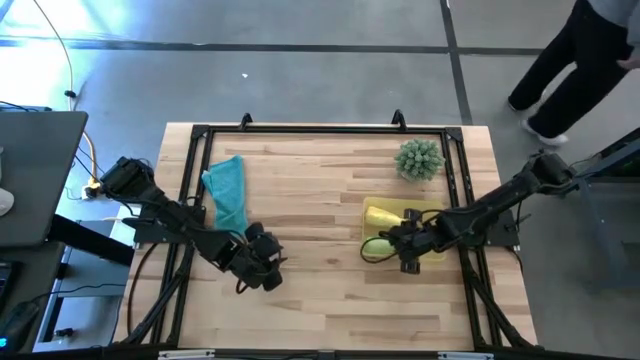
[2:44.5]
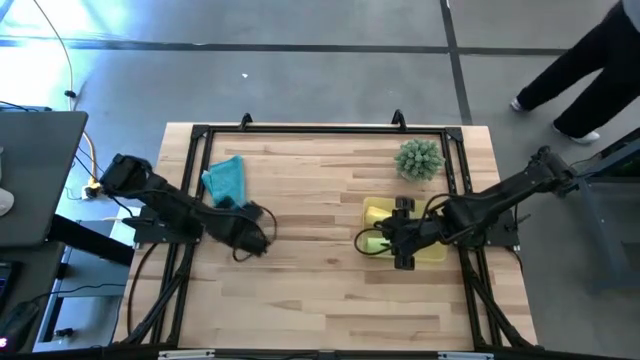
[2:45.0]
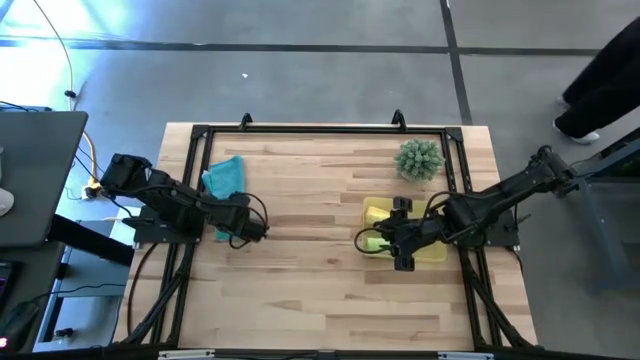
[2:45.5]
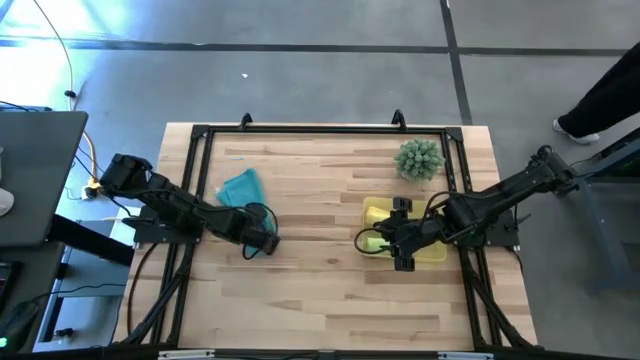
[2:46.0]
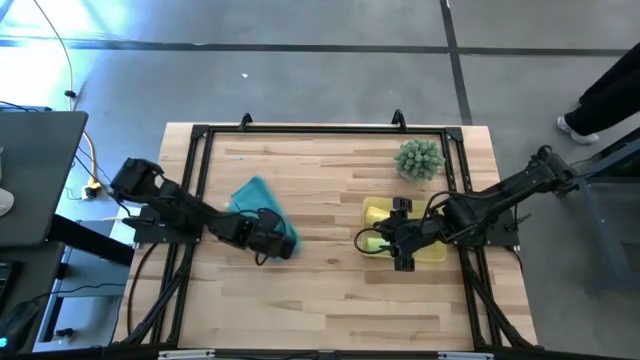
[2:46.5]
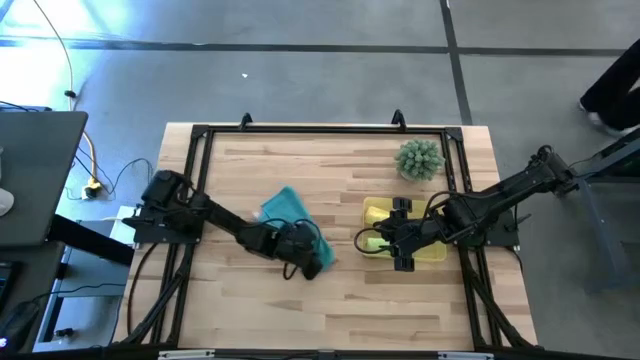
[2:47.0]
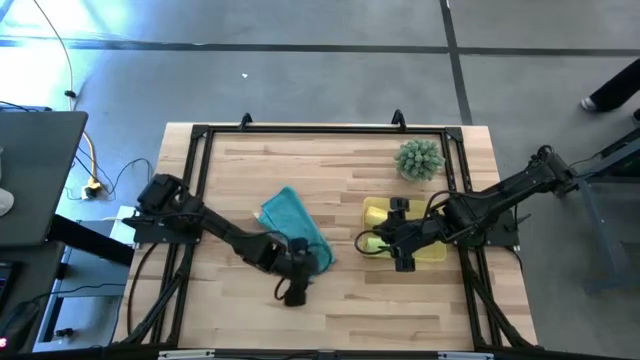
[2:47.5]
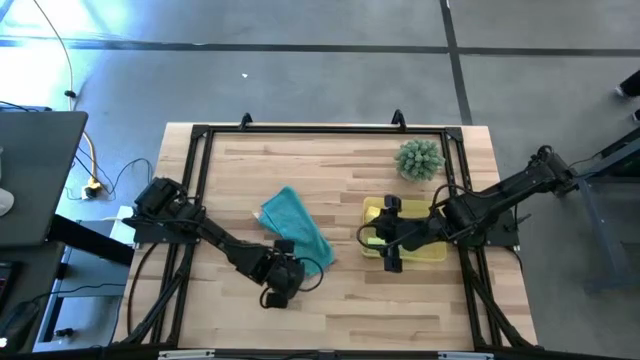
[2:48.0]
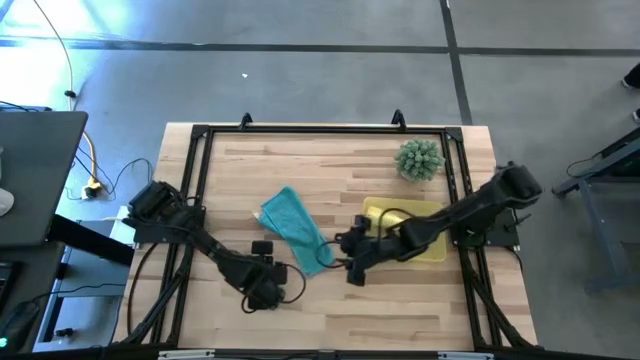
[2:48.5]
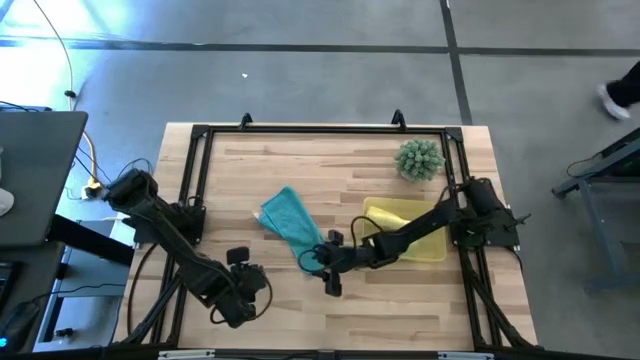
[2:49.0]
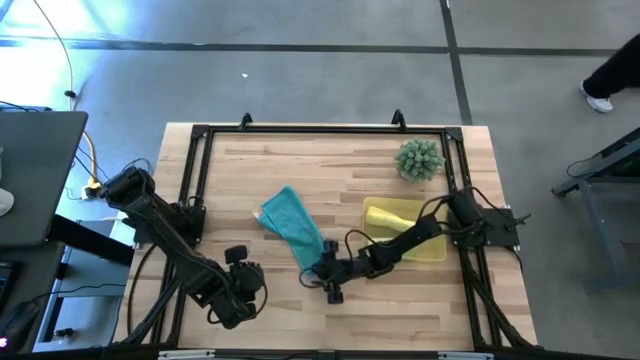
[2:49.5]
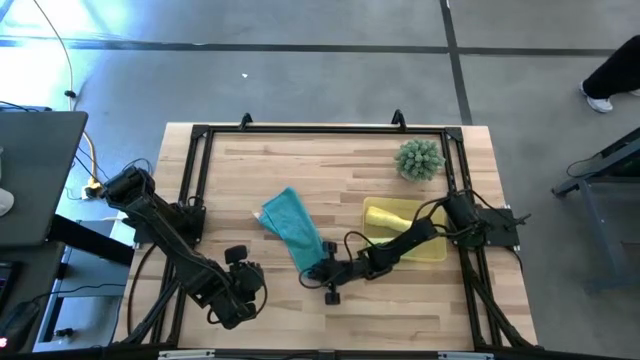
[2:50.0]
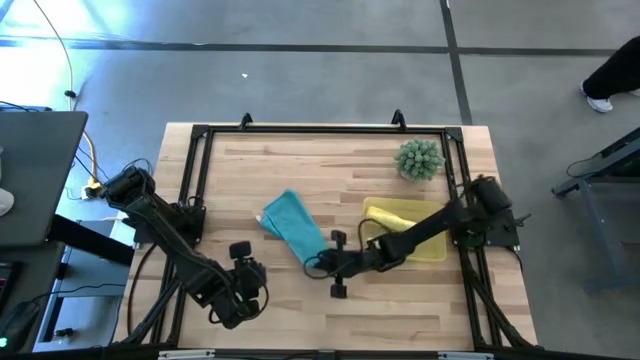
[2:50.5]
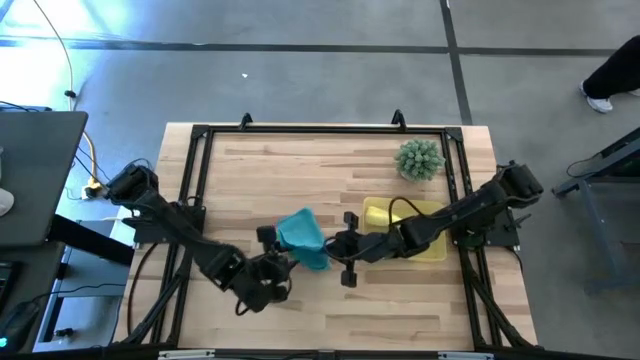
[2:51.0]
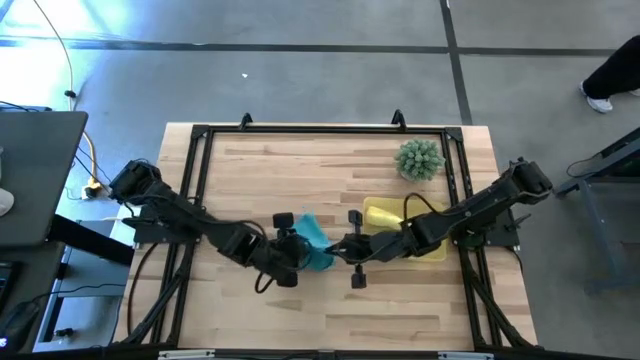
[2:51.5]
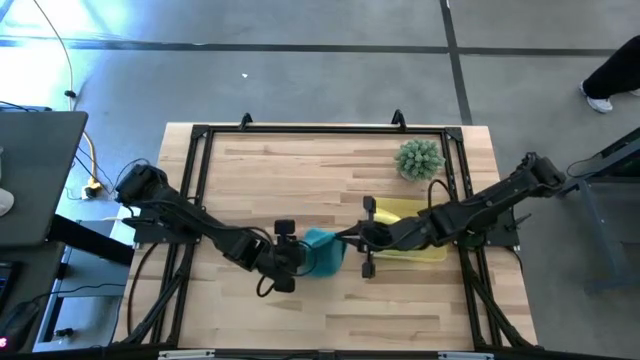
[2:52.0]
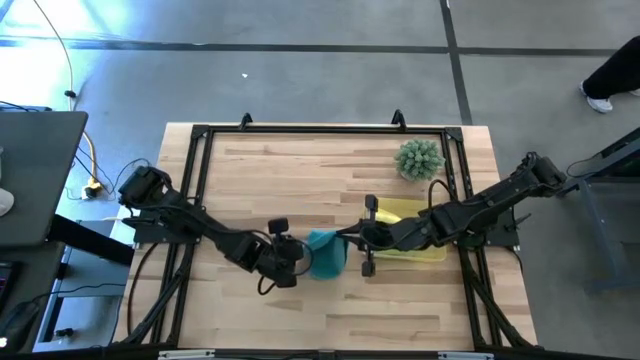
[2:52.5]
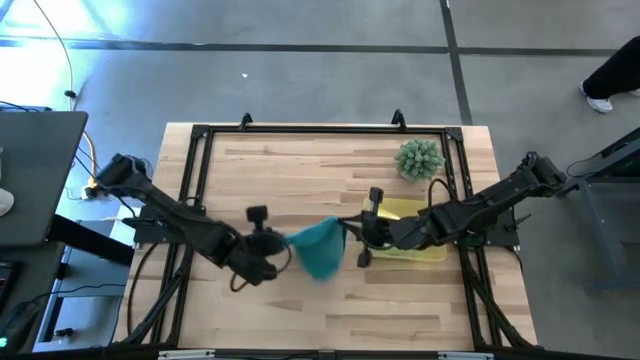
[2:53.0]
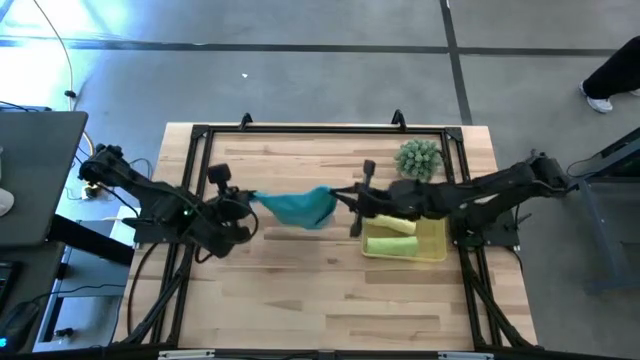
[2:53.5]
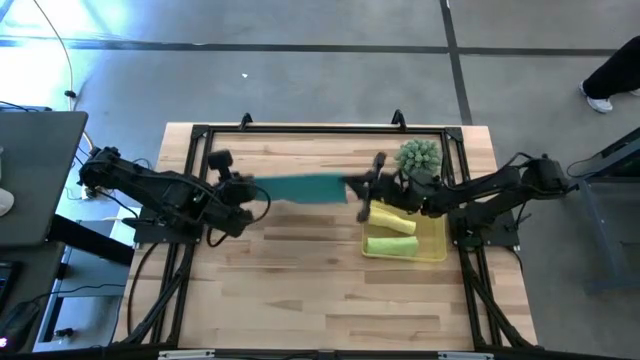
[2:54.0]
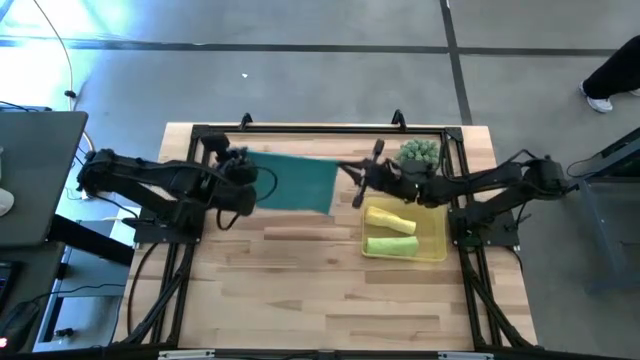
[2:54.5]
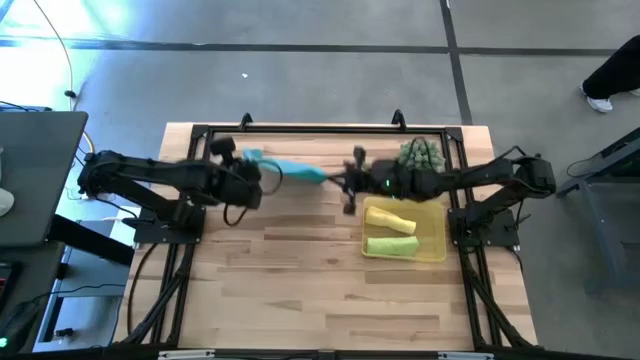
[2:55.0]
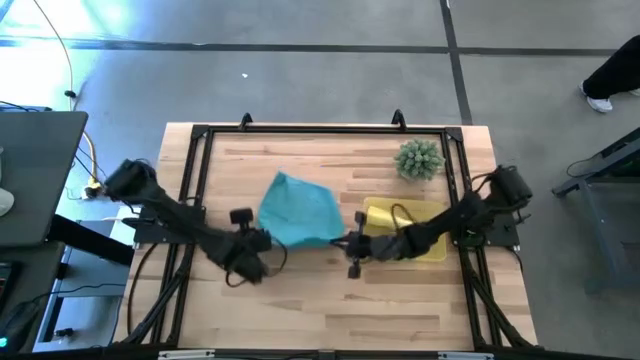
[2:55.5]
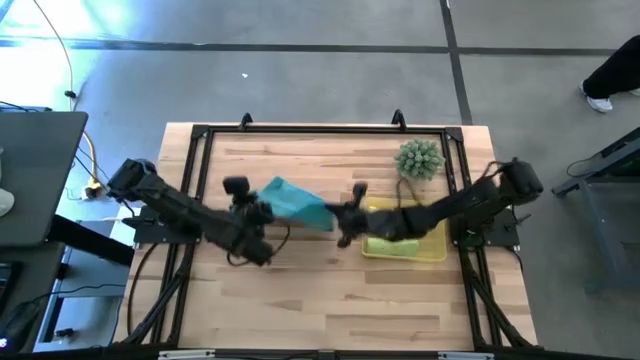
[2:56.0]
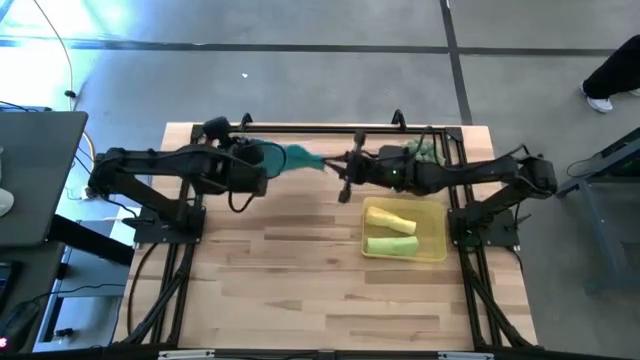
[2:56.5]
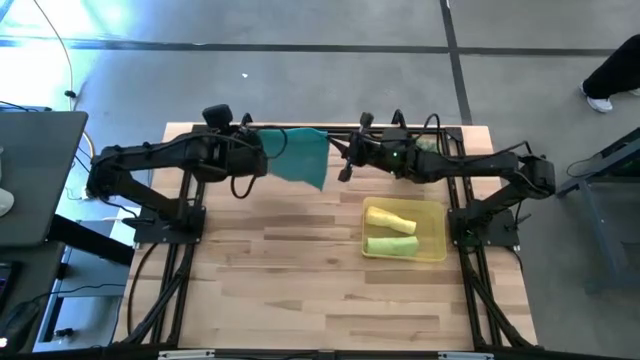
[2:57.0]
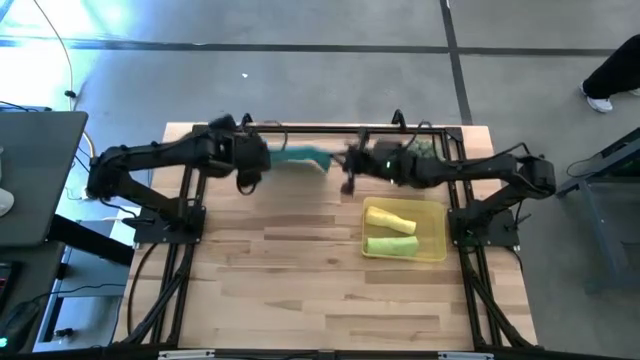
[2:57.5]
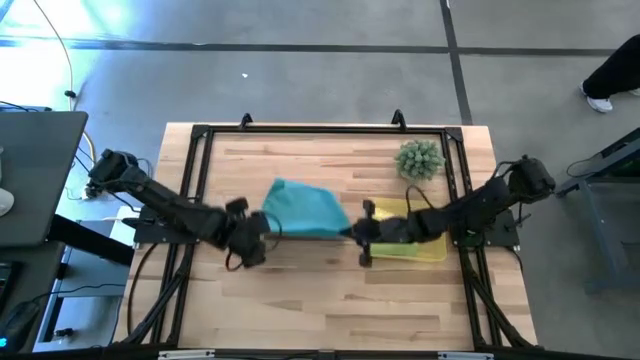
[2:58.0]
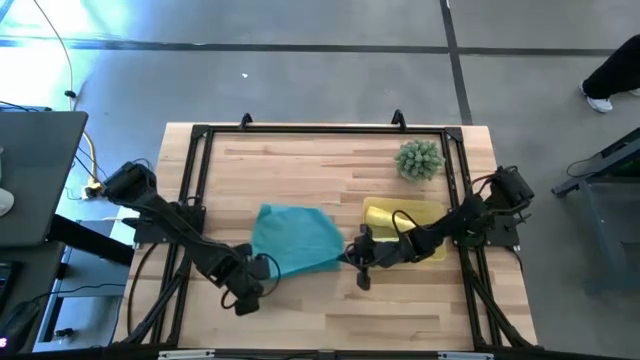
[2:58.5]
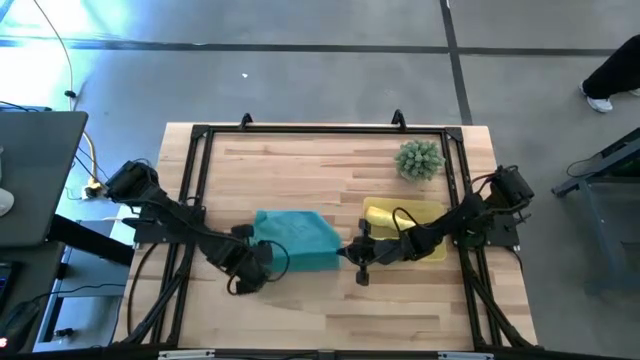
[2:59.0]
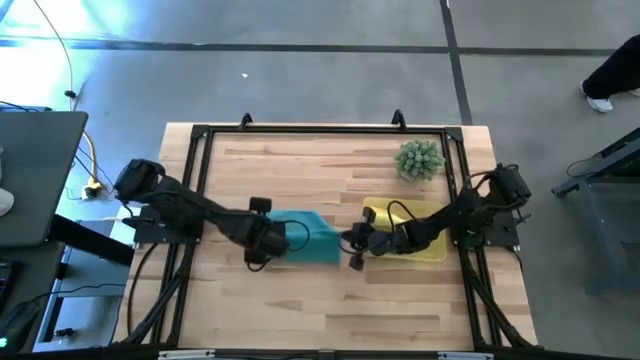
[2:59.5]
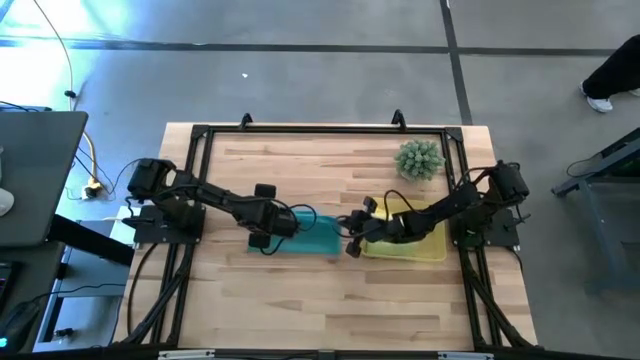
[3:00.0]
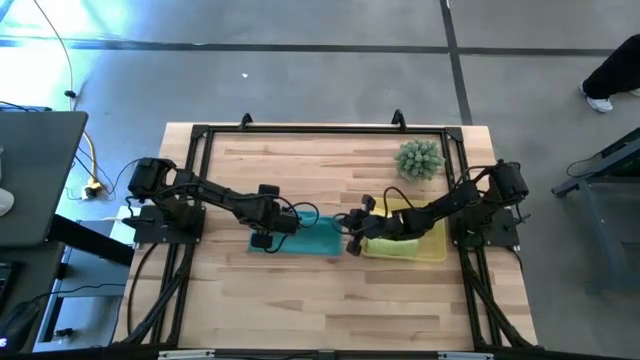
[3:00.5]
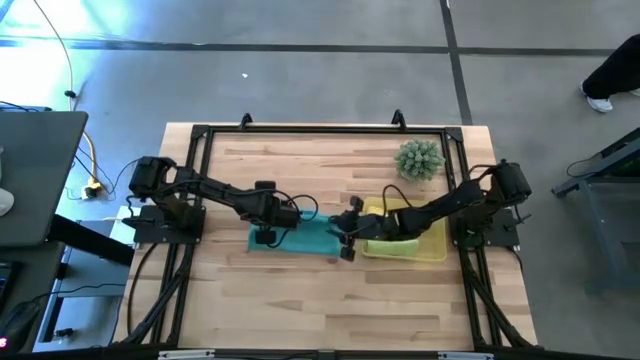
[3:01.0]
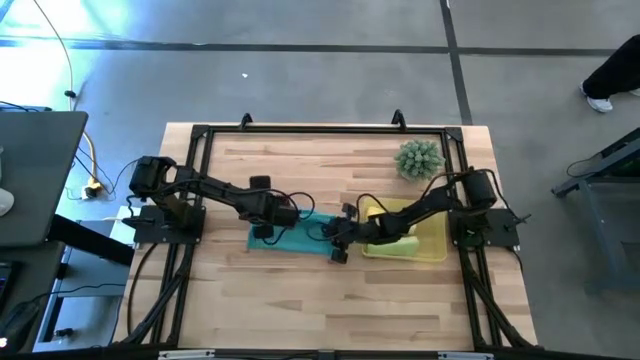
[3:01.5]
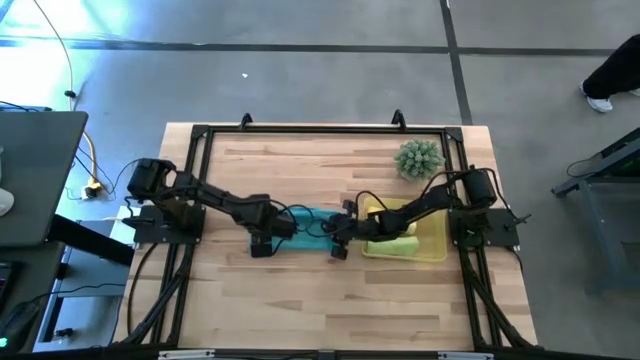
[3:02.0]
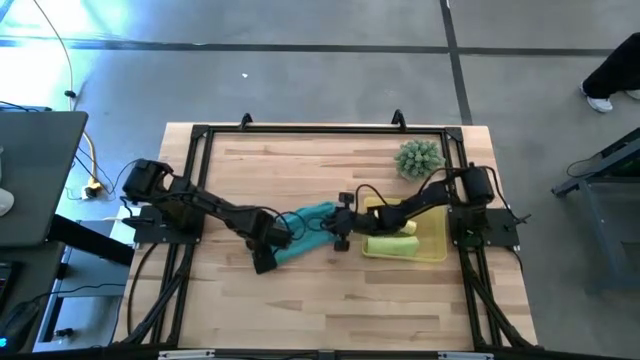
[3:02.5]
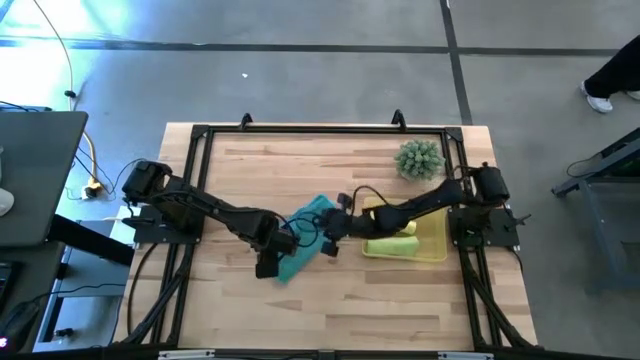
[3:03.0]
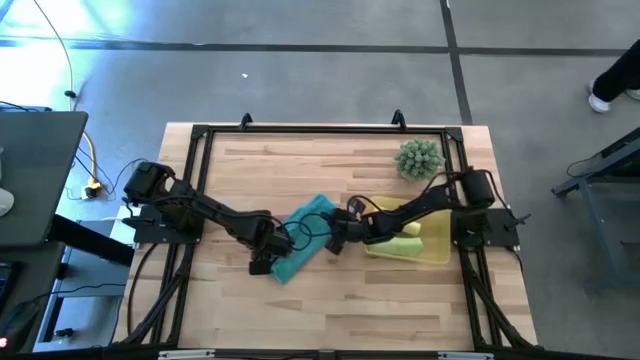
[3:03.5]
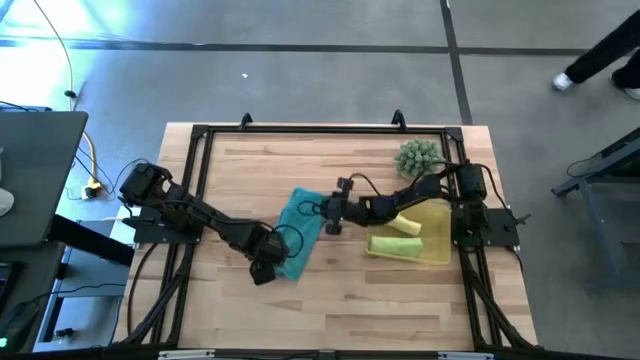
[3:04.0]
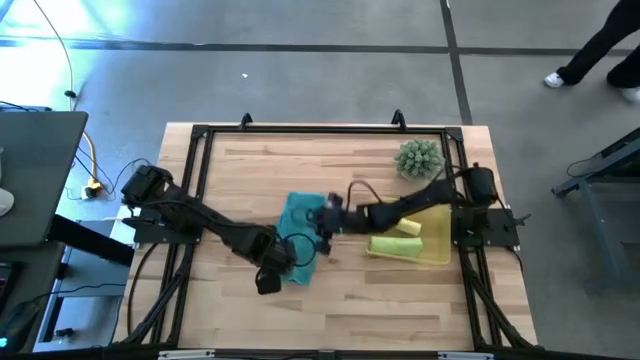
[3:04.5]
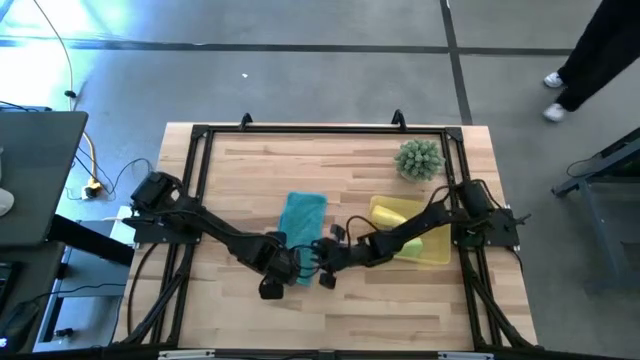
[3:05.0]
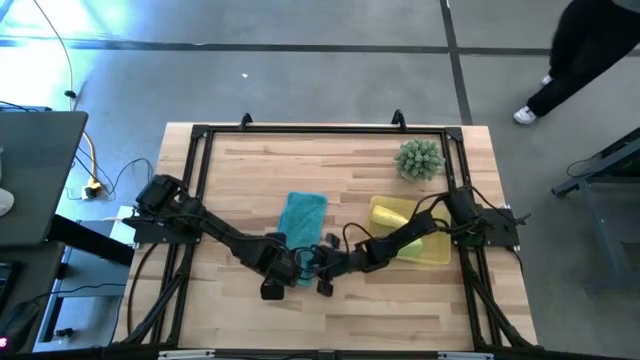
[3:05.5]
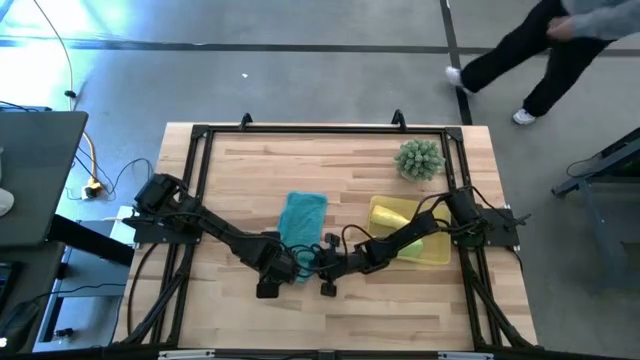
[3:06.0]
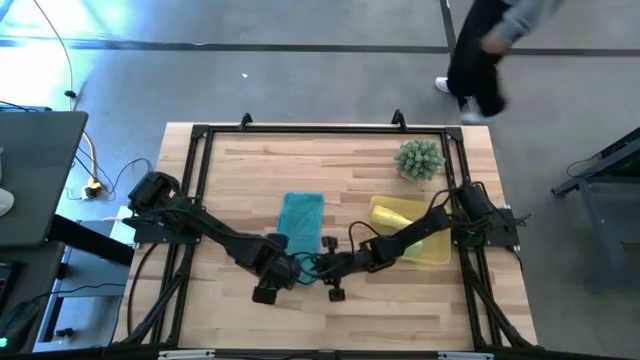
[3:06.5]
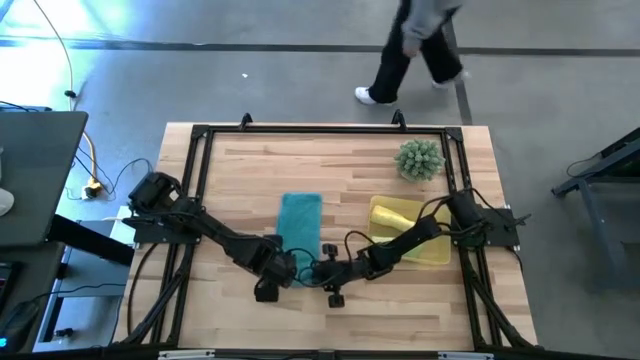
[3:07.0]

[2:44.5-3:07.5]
Task: Roll microfiber towels into tight, uniform cylinder then place into a basket
Fold the blue microfiber towel
